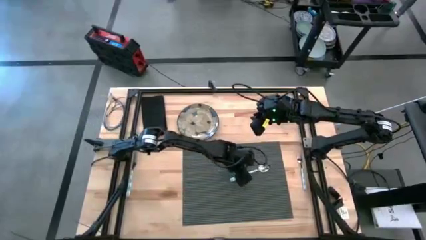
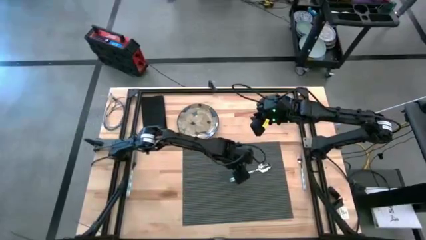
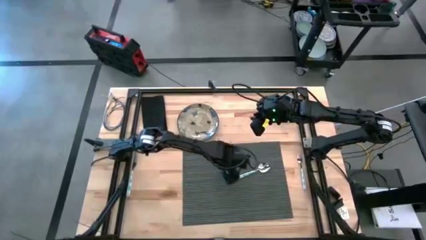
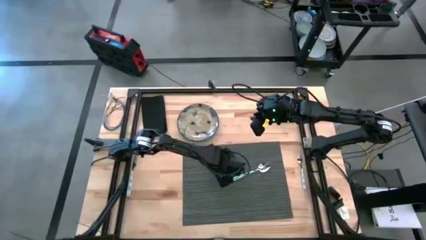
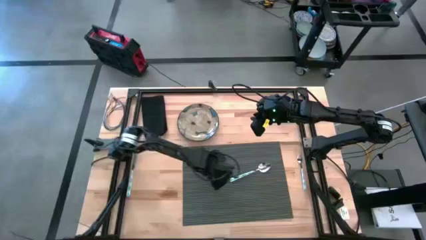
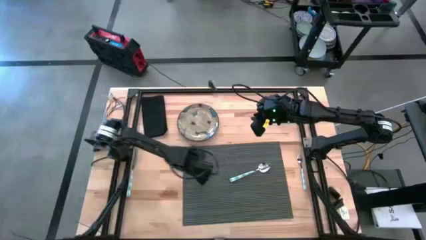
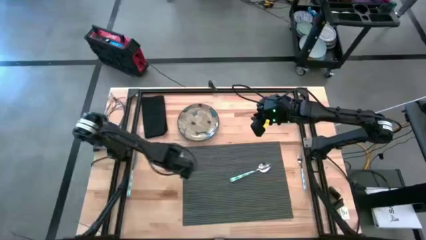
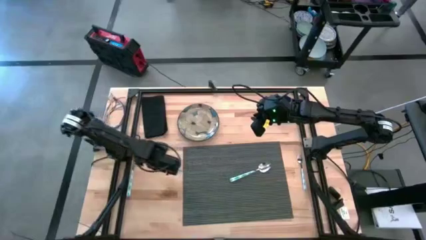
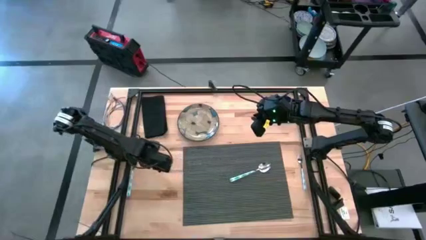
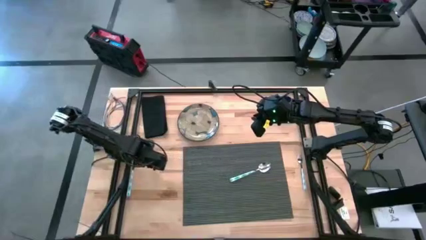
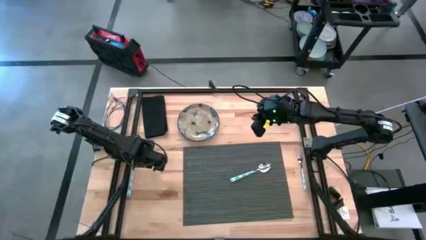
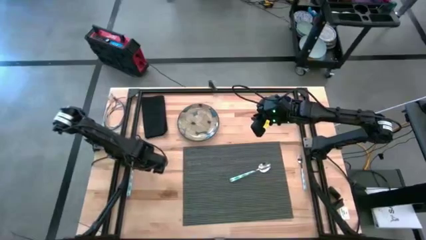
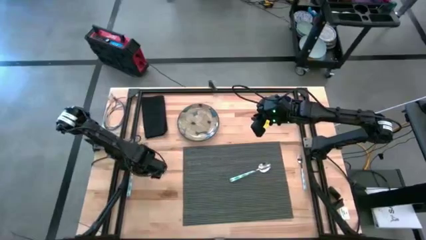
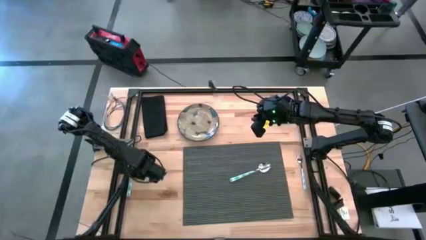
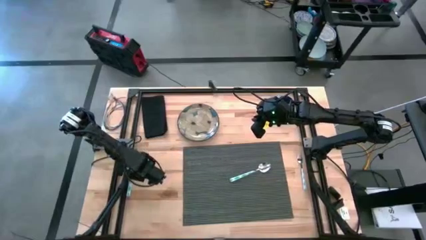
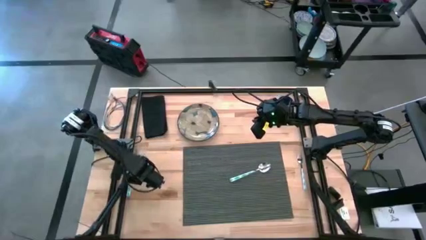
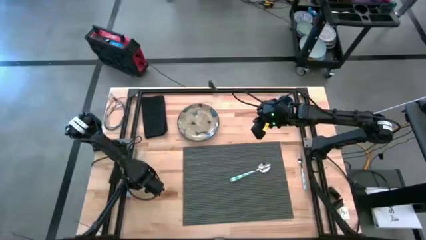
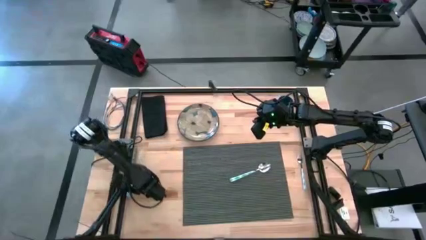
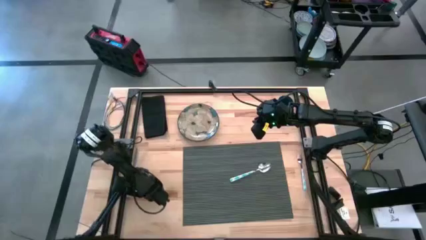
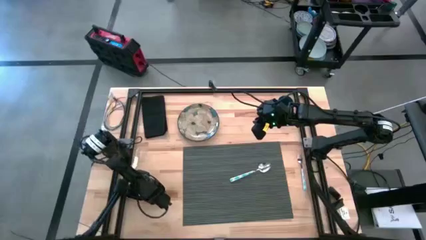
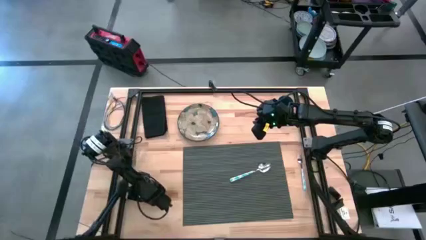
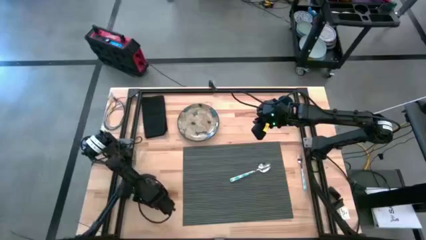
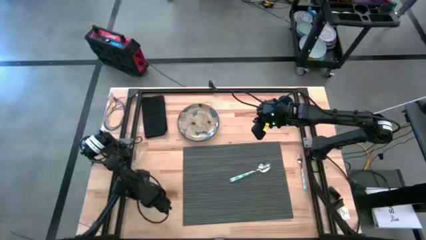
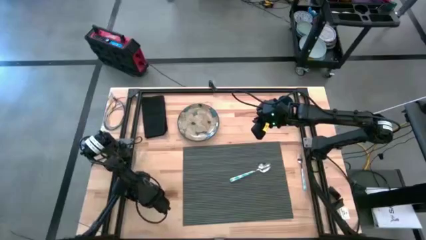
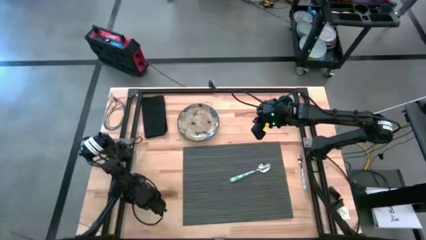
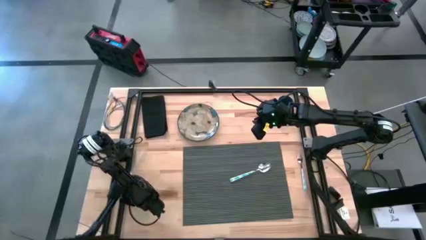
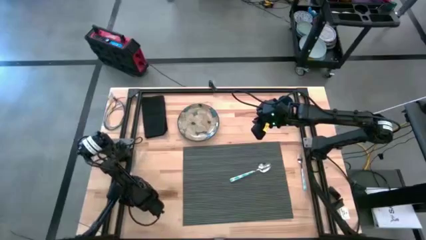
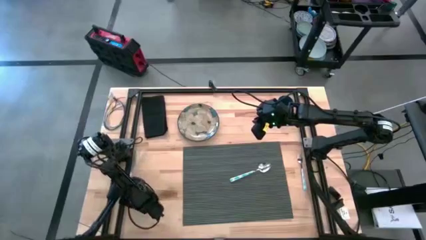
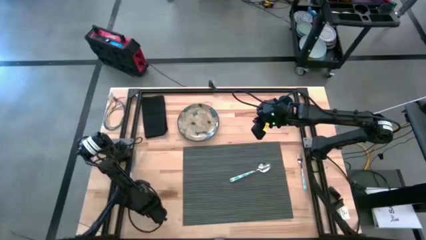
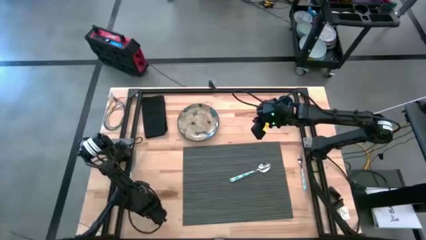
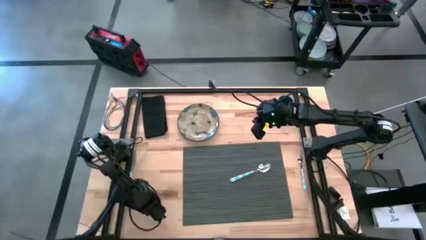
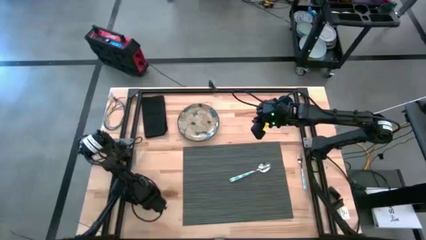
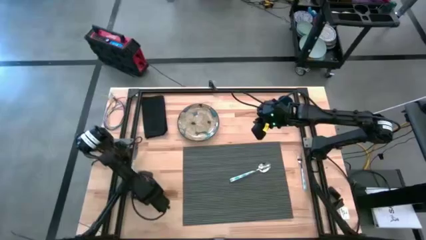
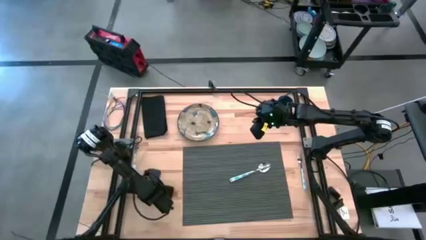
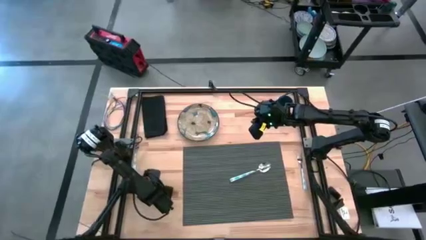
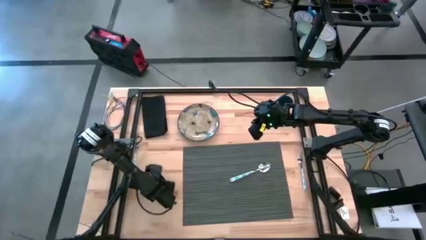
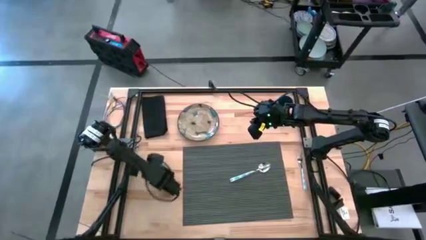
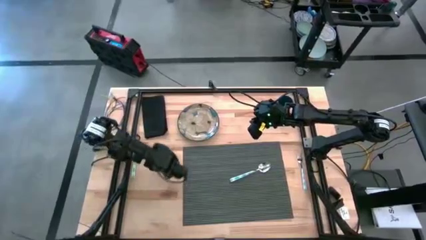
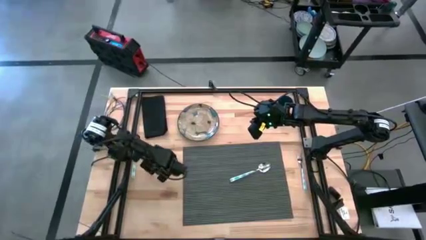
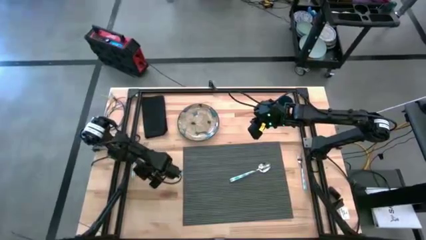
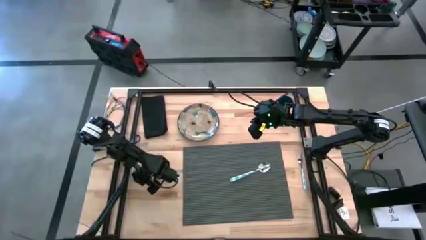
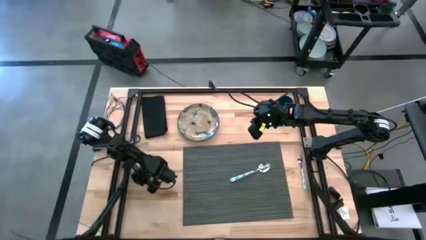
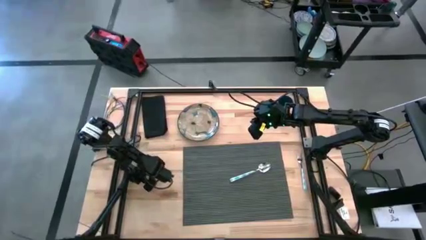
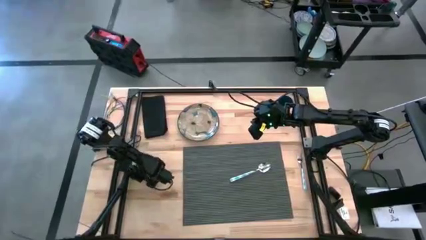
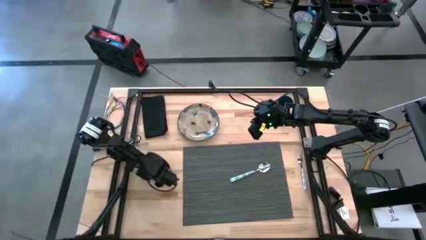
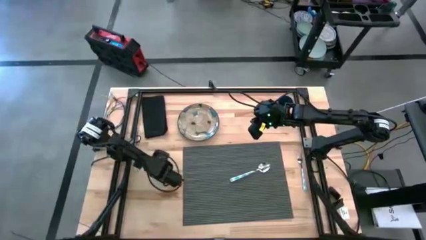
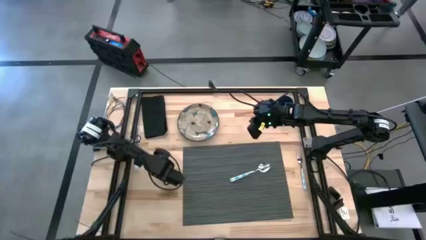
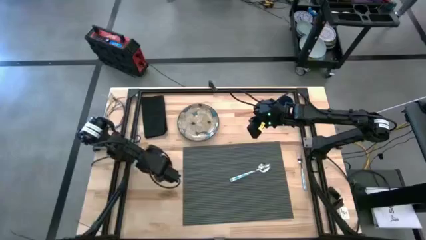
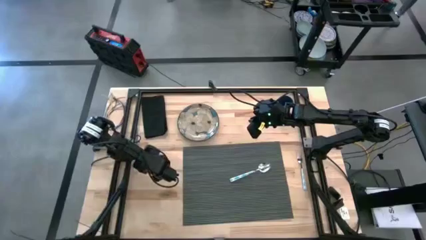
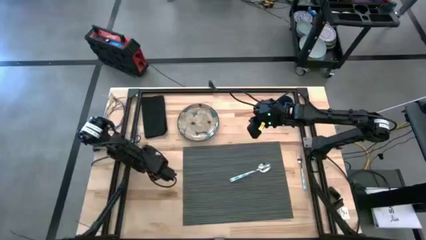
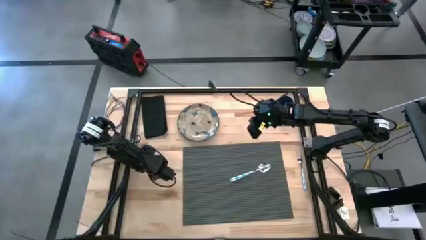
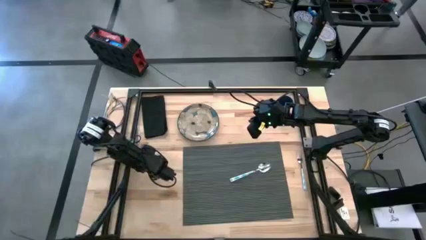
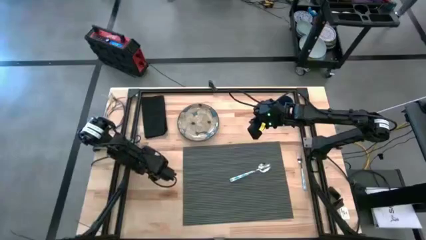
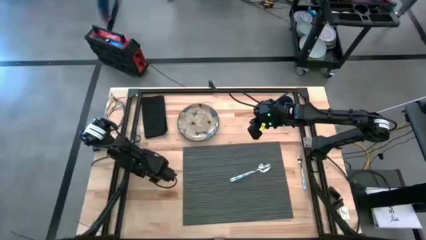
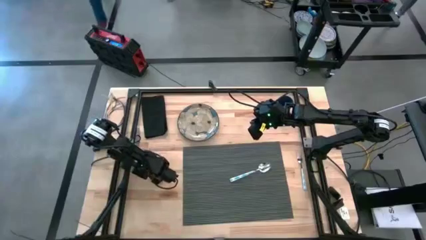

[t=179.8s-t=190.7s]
Task: Set table place
Put the blue knife on the gray mat

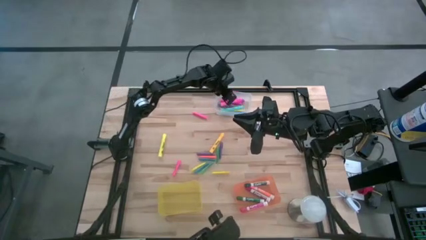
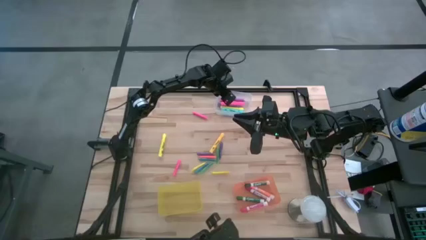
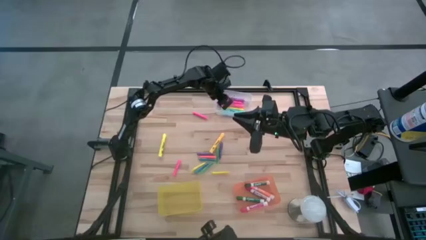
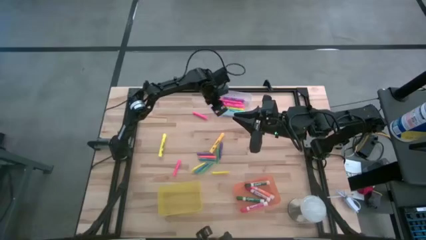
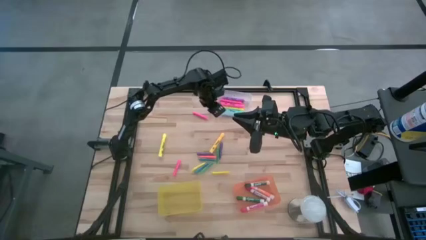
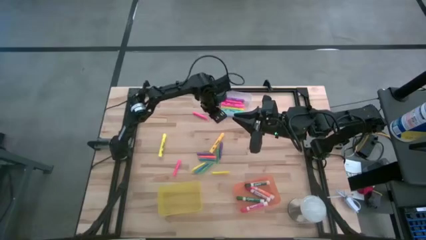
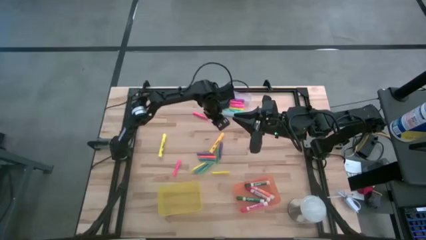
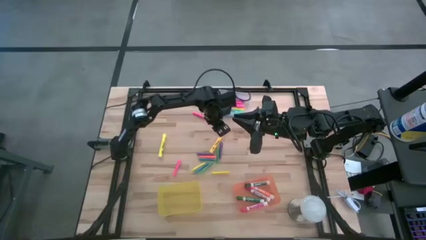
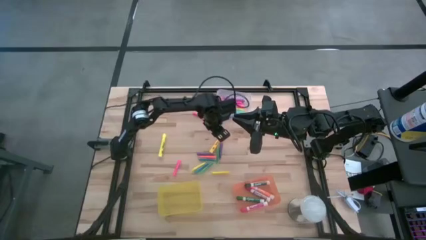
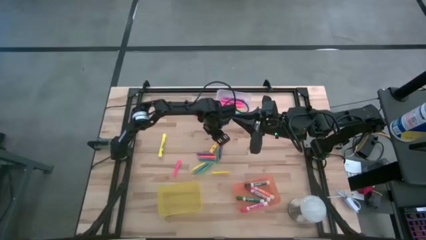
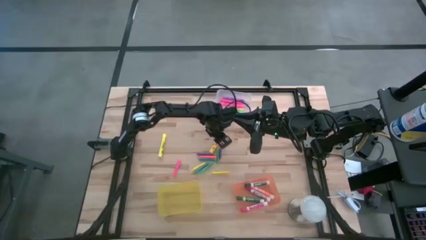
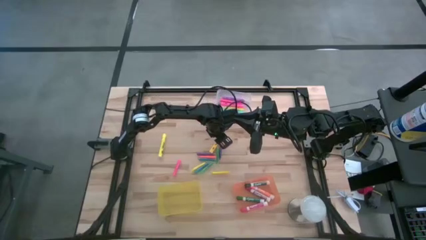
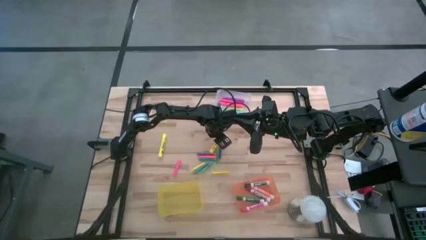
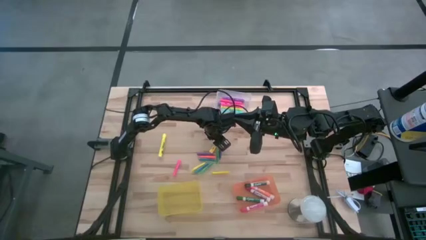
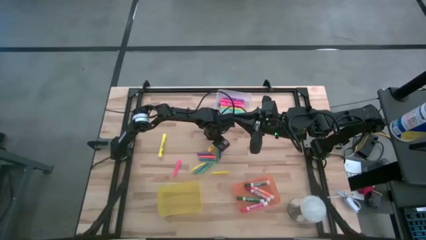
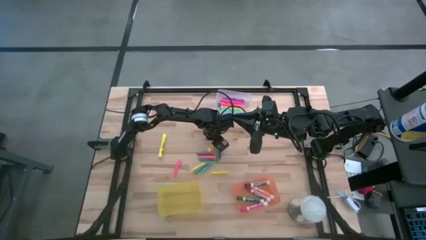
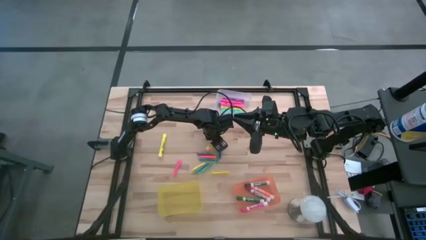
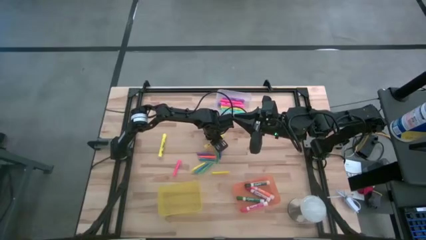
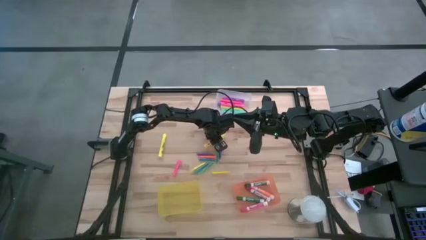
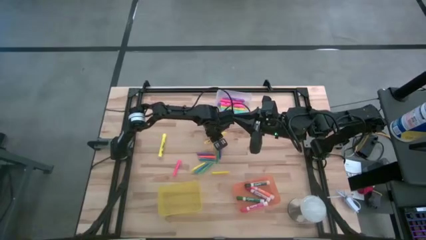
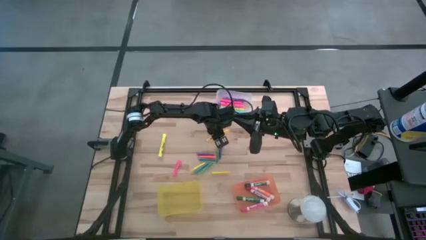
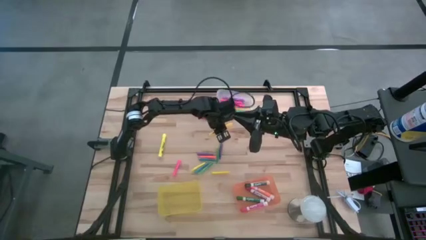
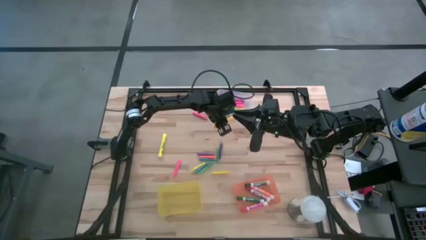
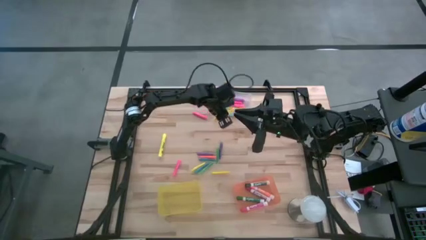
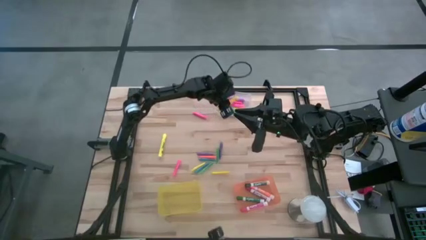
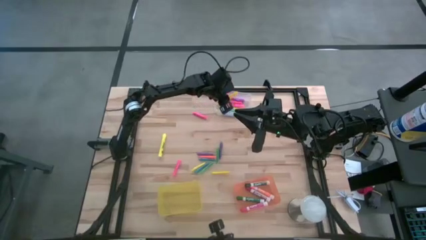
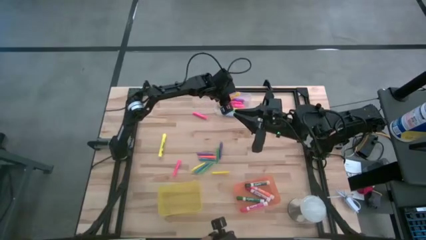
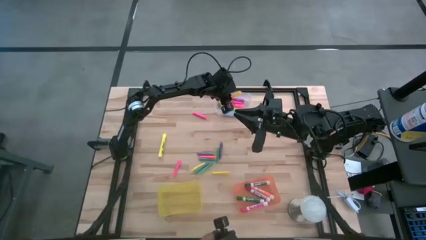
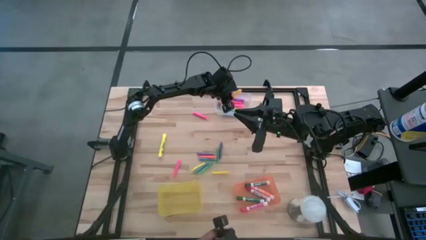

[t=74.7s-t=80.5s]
Task: Pick & Place Markers
Put the orange highlighter pen into the transparent bin
